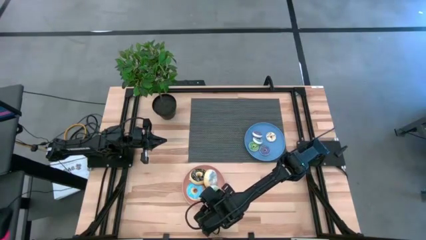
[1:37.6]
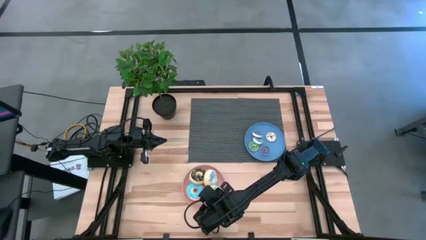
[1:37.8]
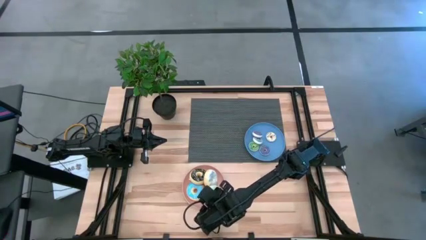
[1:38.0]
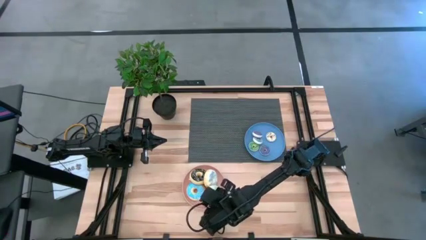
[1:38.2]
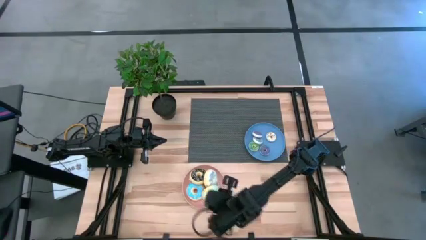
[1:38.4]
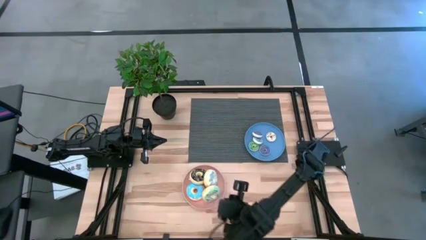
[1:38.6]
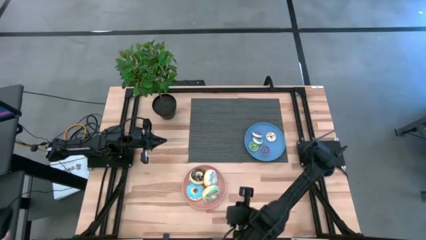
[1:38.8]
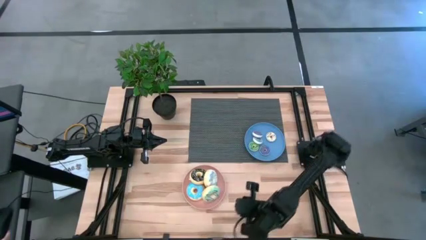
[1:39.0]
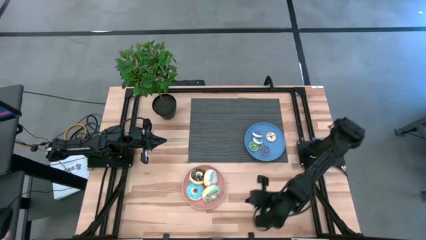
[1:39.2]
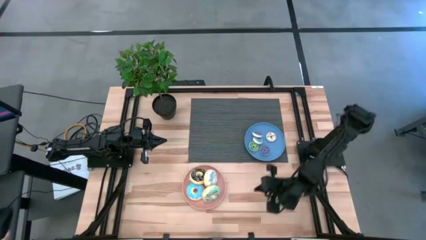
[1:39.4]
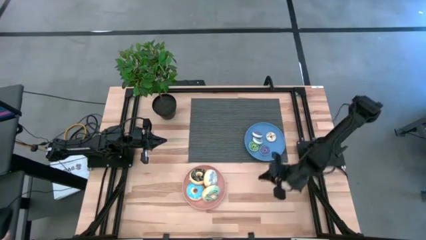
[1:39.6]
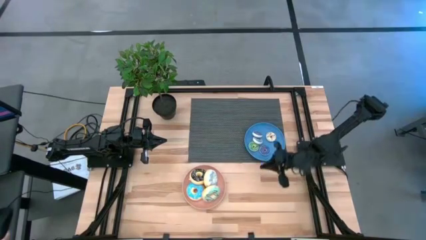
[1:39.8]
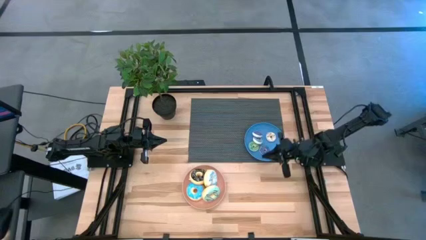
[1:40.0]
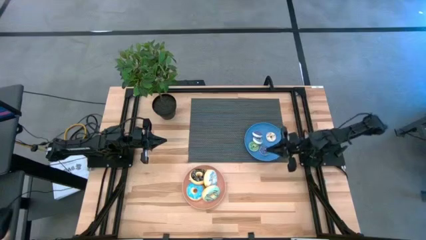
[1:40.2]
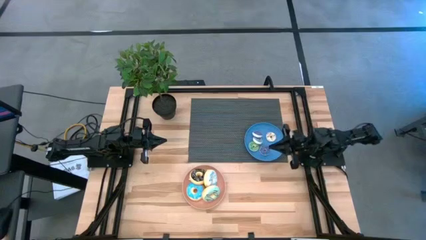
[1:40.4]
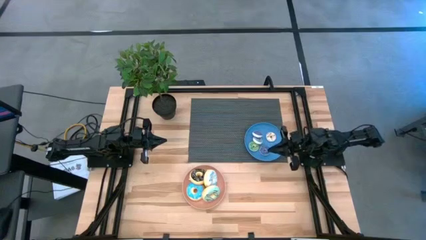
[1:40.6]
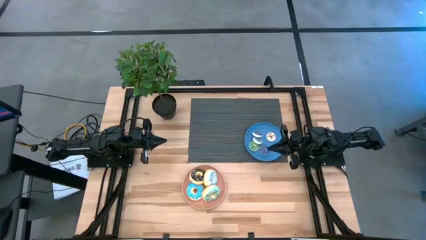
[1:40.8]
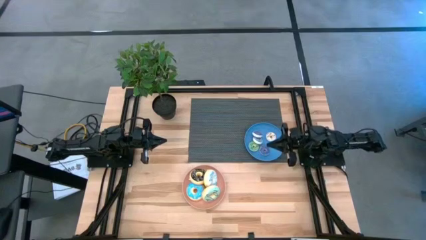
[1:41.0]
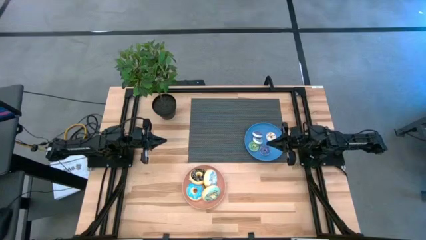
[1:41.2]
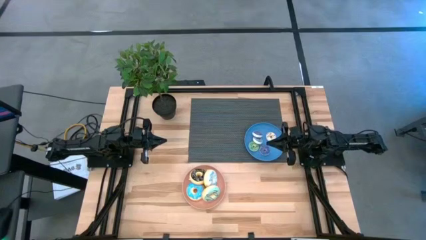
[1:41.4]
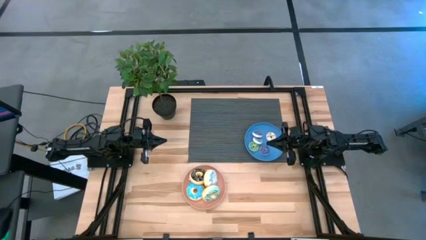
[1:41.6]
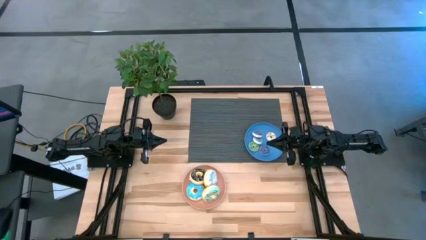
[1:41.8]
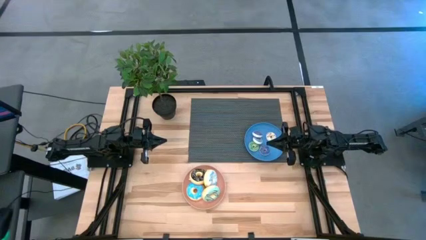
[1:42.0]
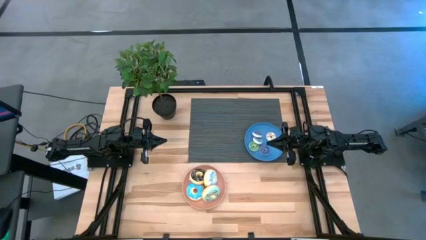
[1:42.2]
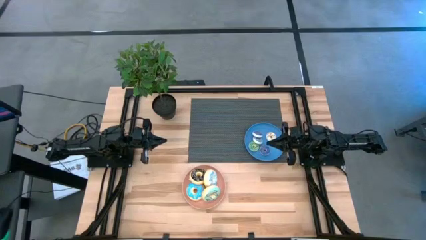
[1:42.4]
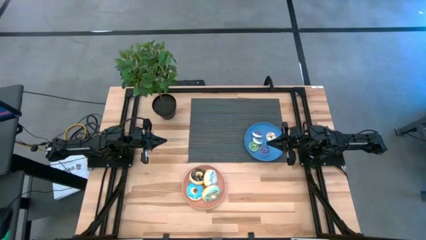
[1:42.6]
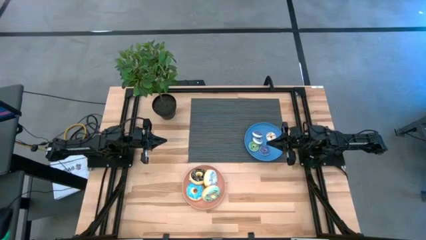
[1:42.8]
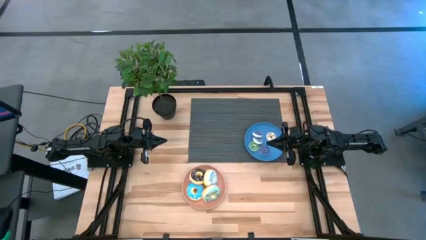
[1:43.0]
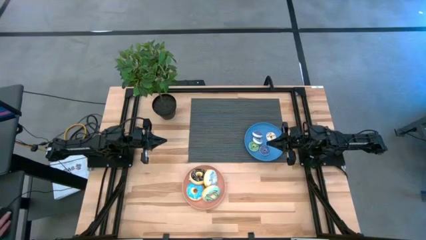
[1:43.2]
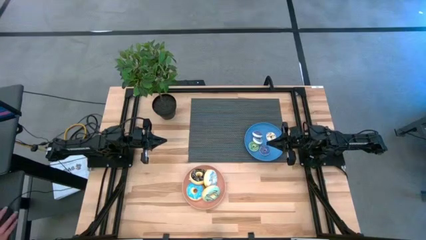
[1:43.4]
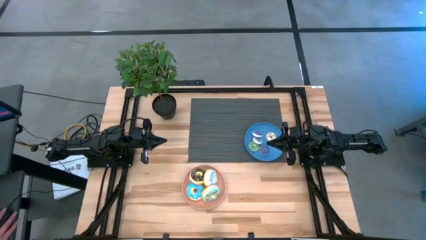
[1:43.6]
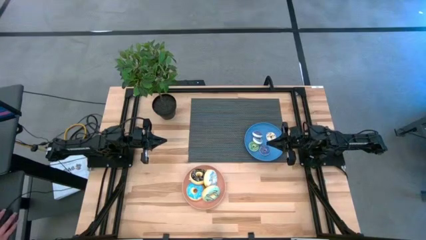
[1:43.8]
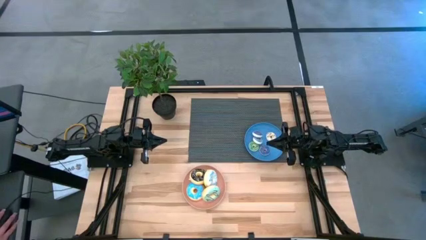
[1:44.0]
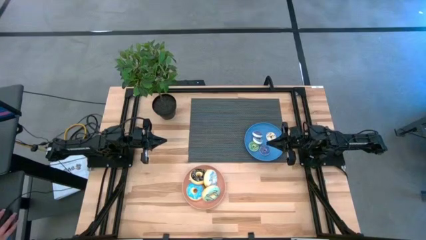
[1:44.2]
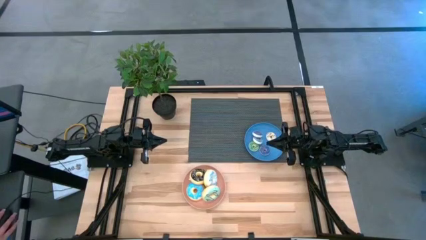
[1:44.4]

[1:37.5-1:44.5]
Task: Pick & Place donuts
Return to Home Position

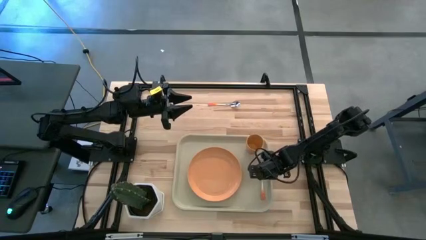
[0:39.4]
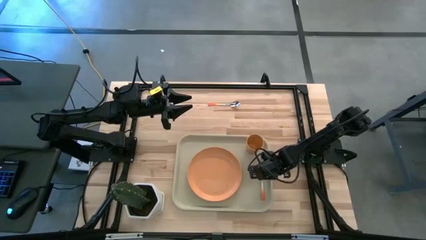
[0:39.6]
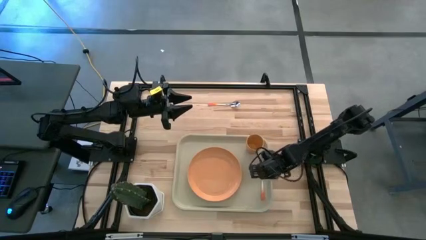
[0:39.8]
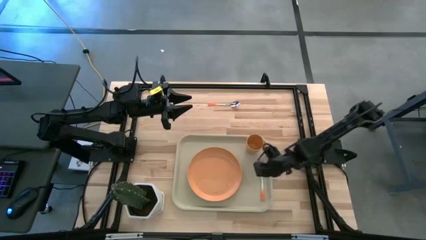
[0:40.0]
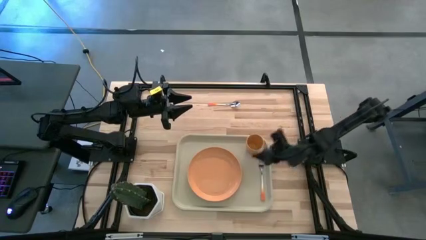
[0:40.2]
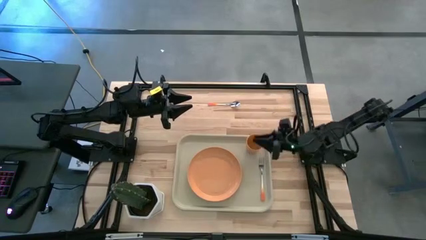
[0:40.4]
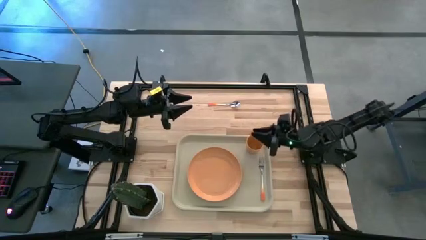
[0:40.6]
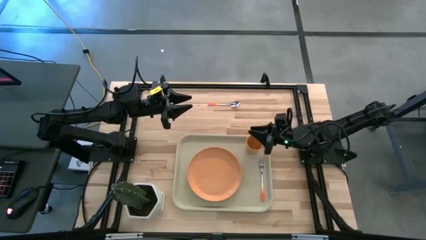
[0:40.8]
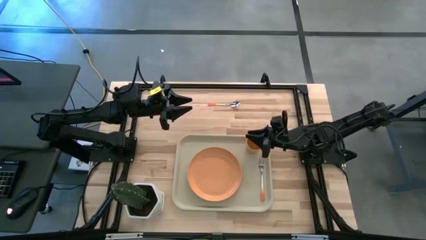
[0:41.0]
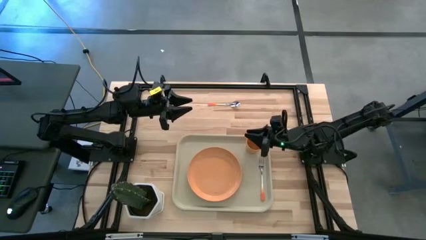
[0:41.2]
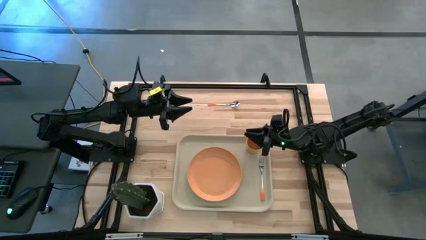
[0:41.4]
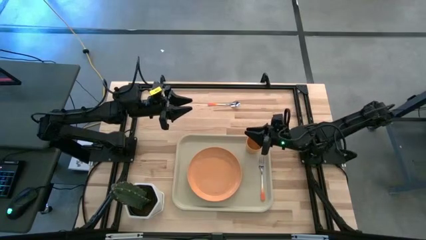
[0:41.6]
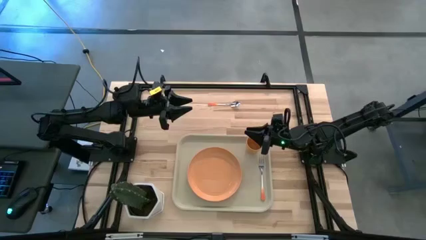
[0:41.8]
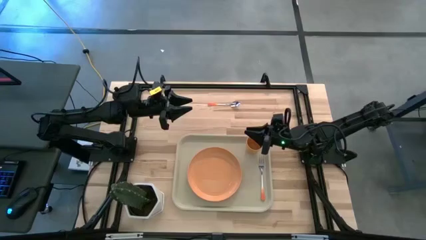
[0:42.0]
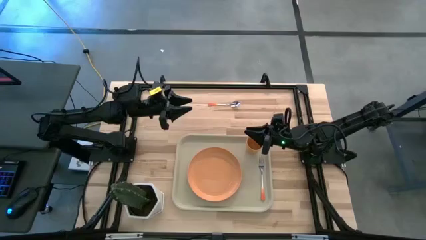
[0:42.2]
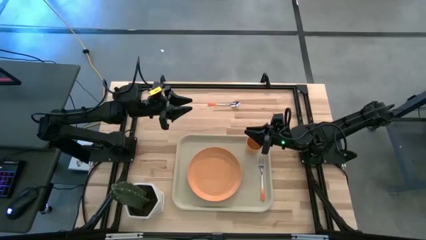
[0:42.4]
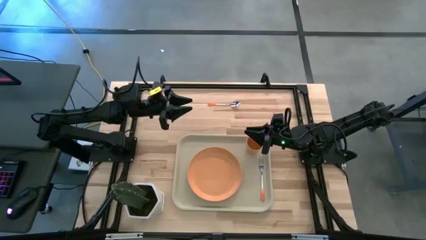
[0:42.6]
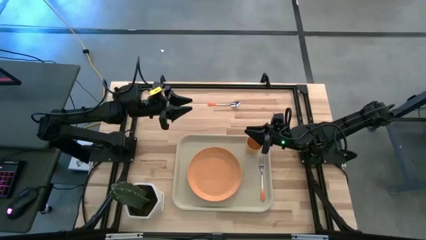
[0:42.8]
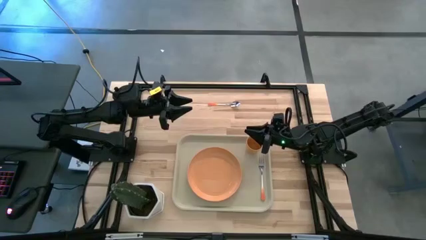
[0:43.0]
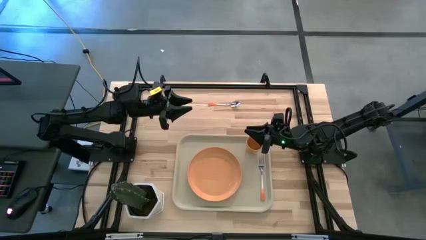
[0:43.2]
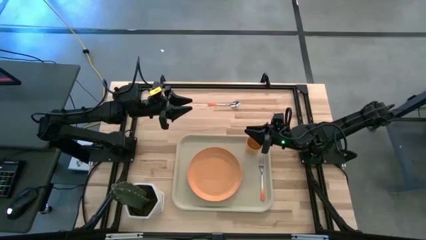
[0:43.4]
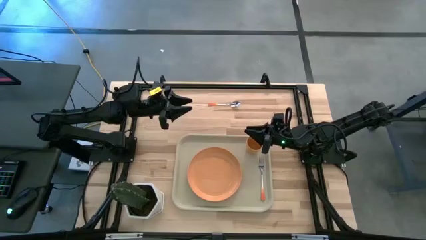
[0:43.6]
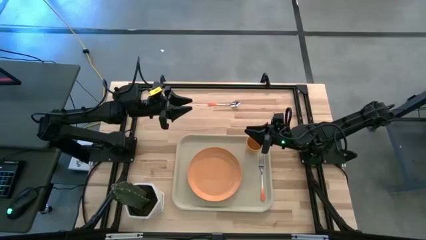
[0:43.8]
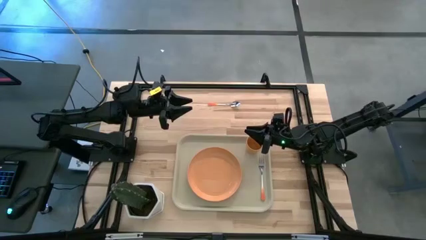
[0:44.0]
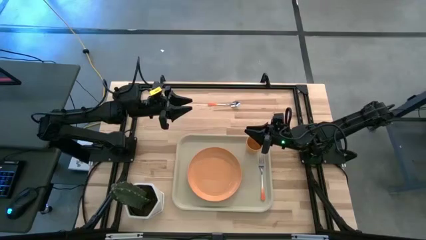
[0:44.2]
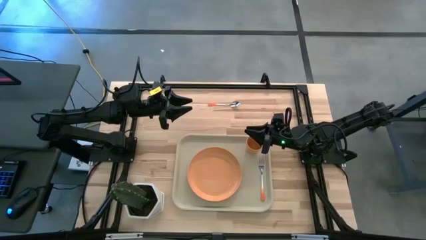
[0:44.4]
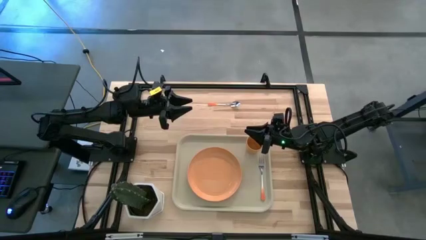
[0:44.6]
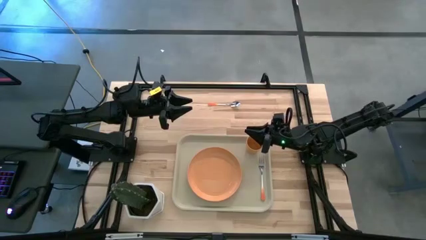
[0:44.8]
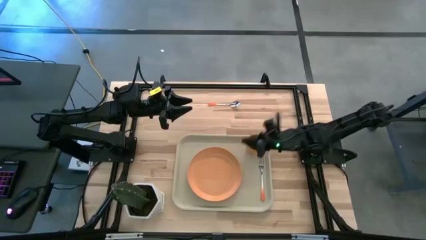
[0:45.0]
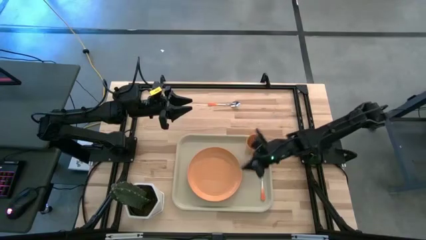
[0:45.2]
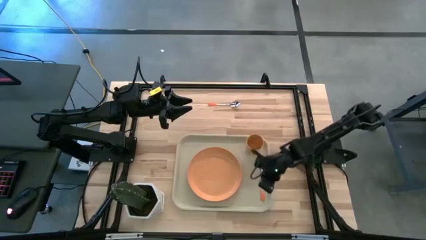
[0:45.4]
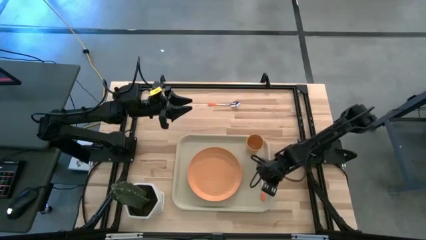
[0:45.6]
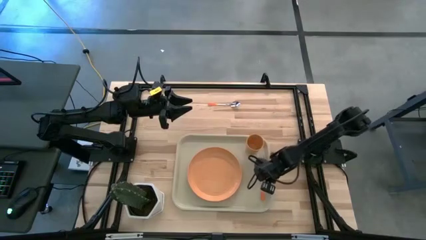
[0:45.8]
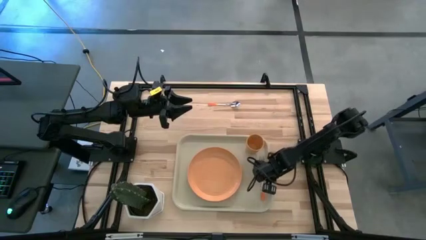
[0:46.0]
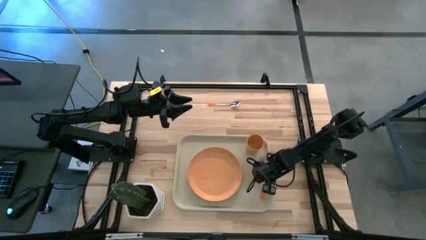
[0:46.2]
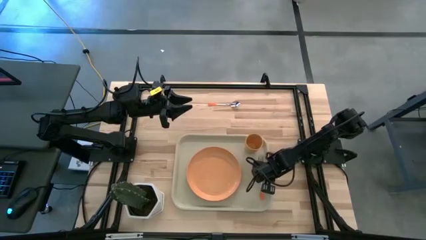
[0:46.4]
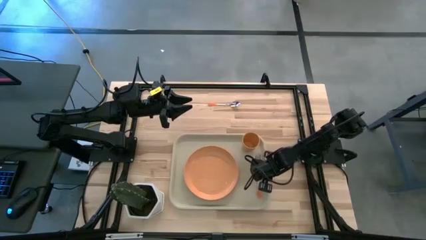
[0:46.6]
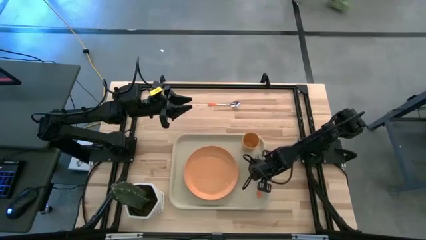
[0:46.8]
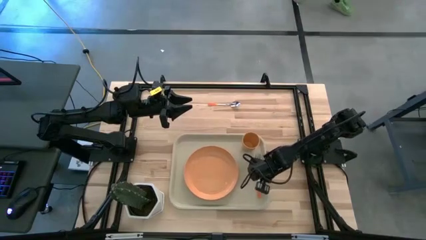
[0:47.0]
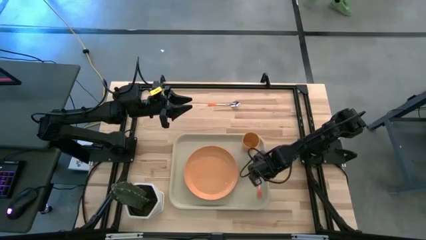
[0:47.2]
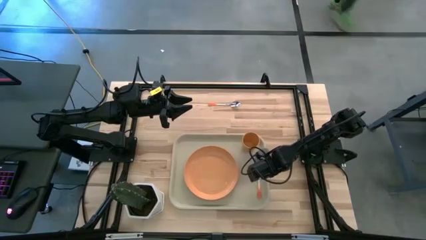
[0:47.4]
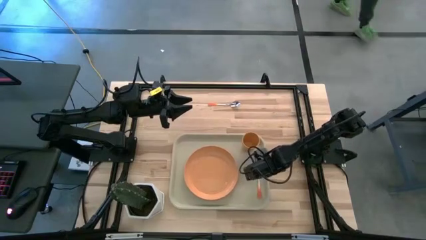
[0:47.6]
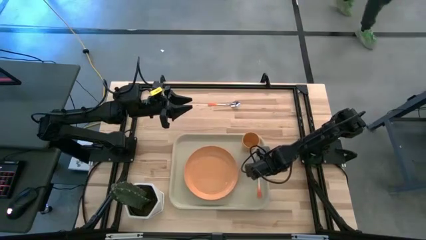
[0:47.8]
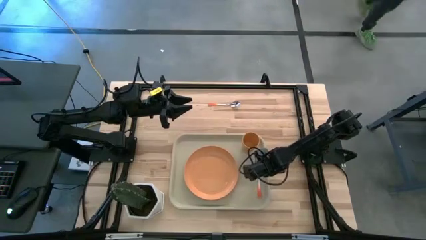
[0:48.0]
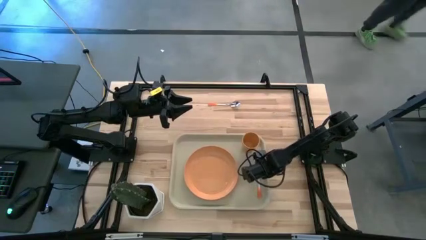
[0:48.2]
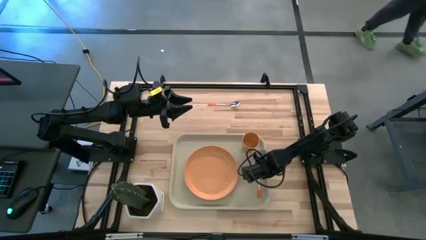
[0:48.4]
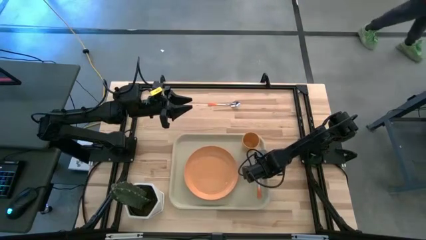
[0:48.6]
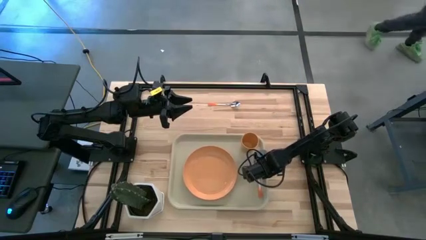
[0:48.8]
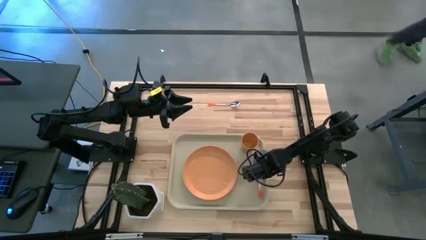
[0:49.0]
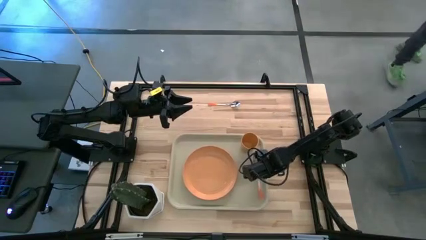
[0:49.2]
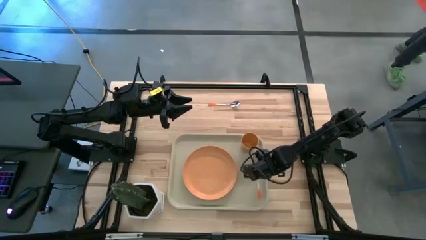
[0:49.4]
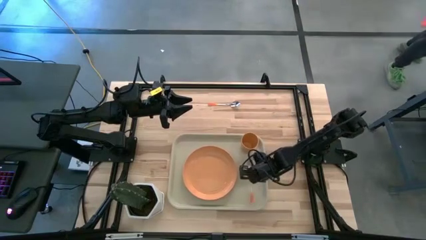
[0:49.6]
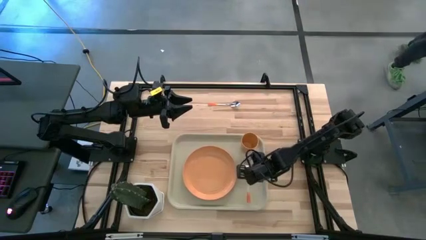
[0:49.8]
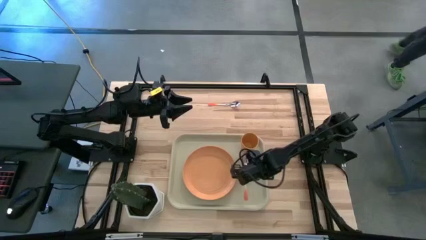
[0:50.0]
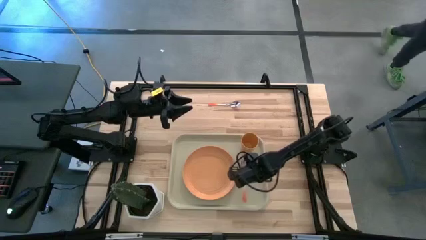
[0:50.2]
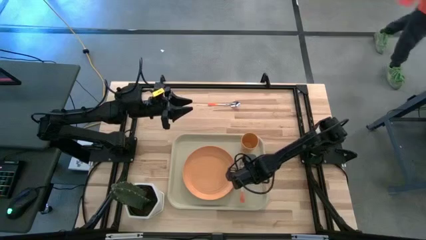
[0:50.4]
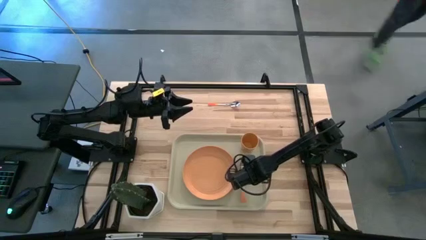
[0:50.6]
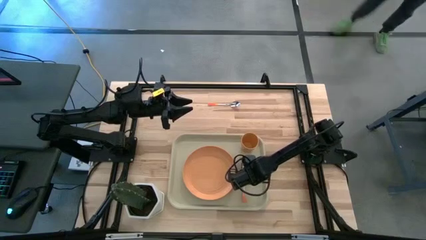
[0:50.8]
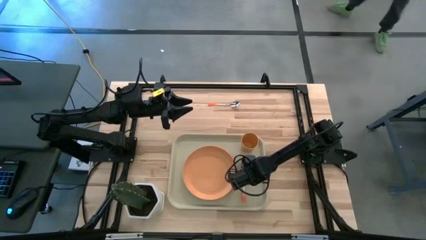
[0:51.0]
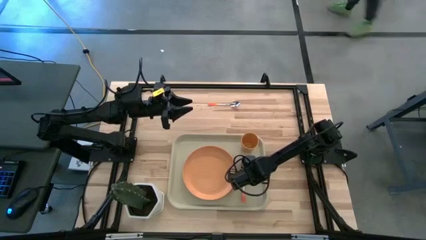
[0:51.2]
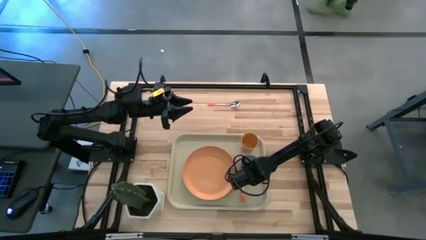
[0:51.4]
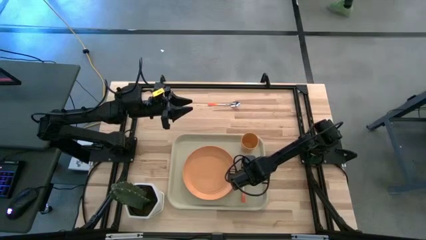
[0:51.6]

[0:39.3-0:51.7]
Task: Pick and place plate/cup/fork/spoon on tray
Adjust the orange fork on the gray tray
